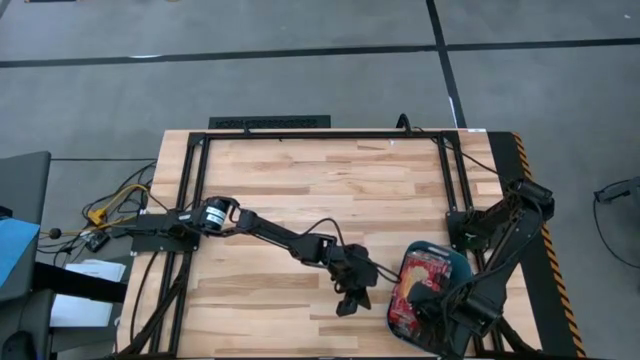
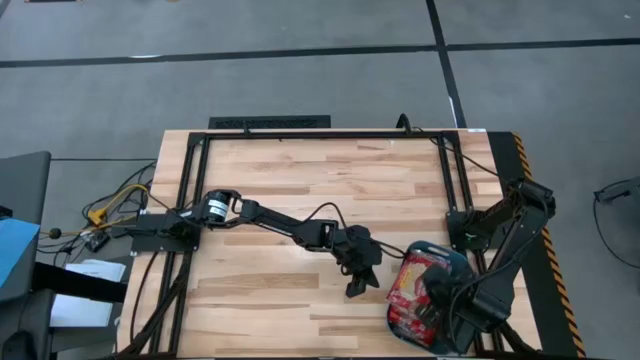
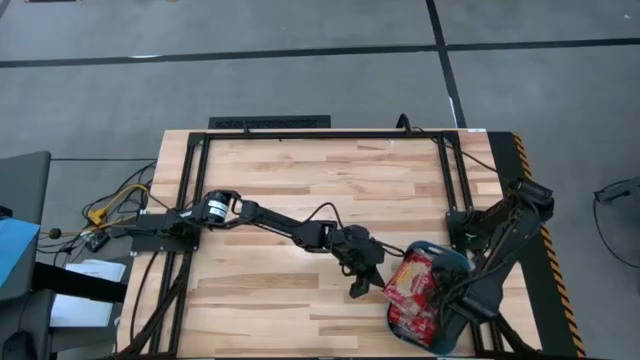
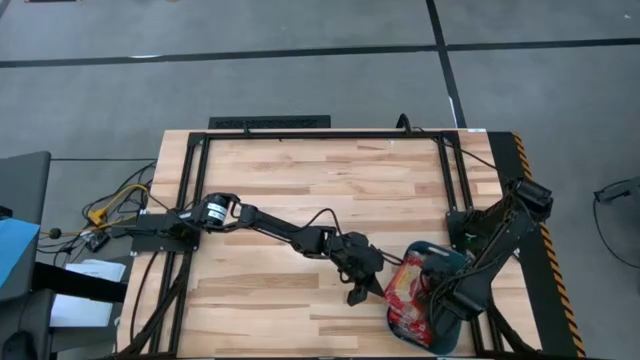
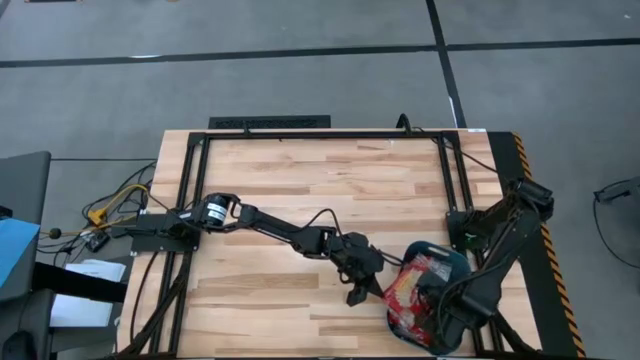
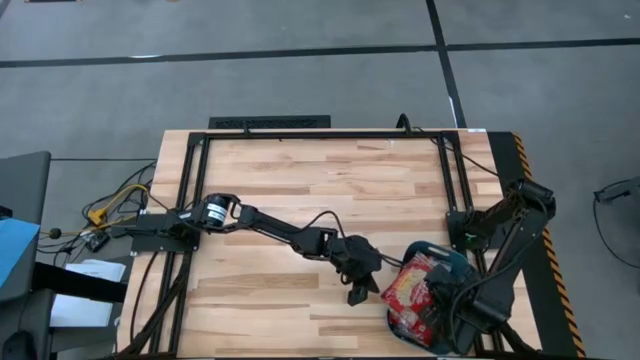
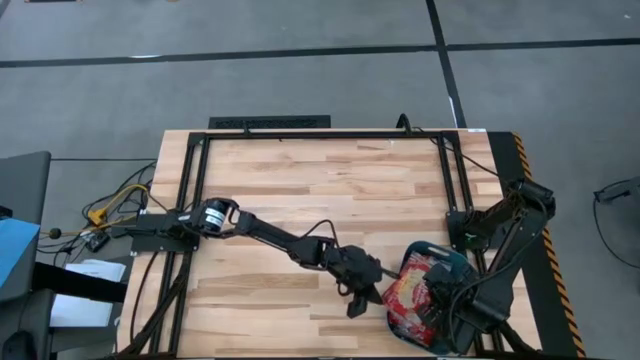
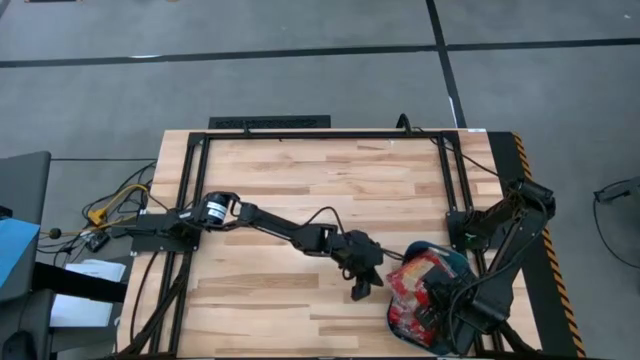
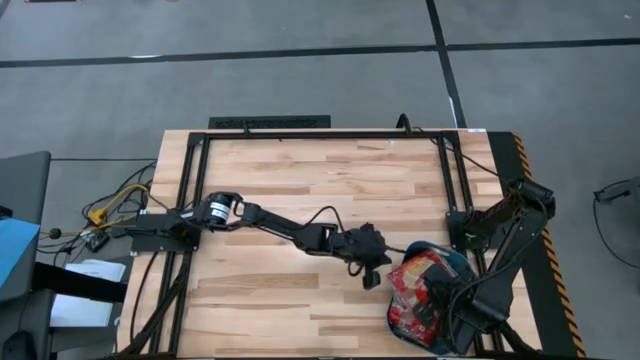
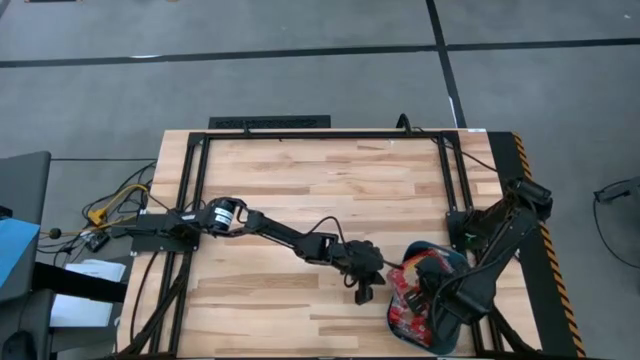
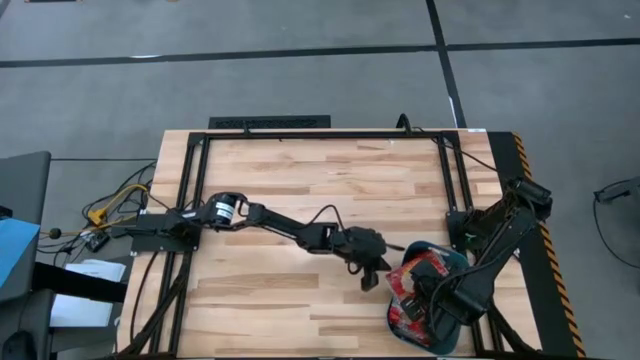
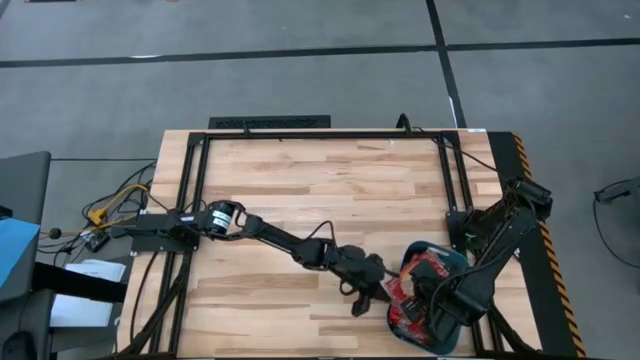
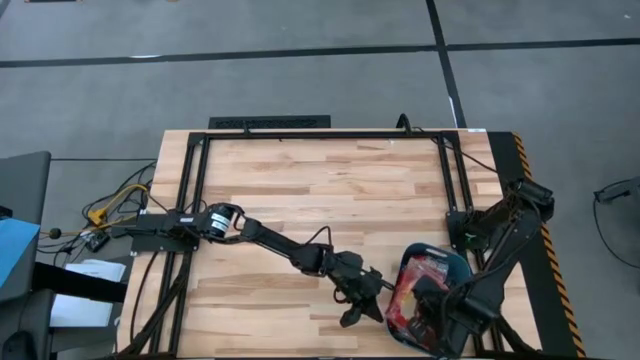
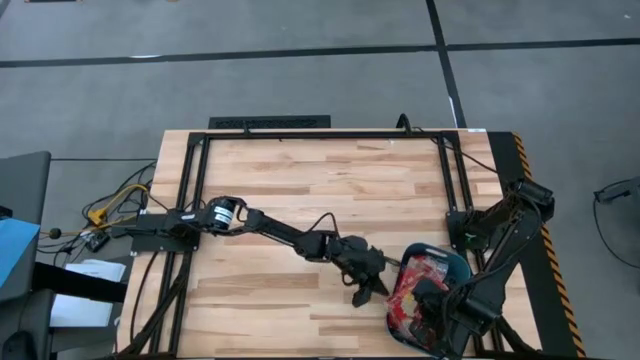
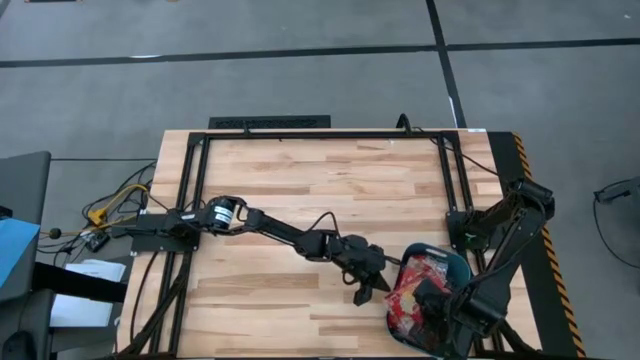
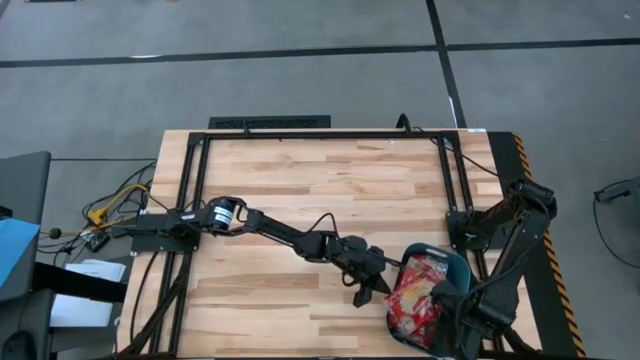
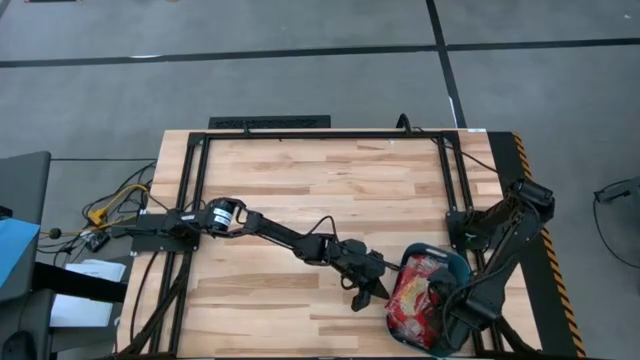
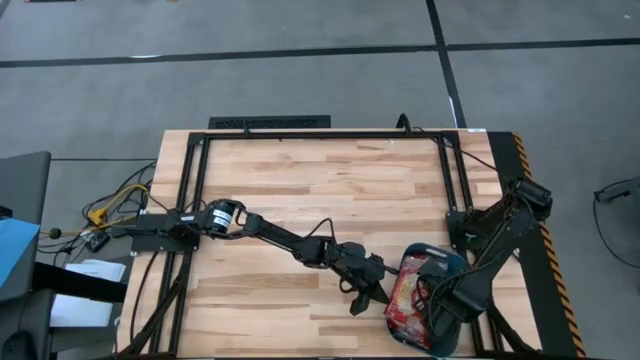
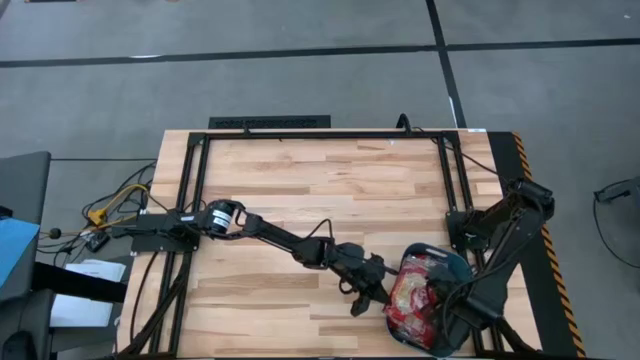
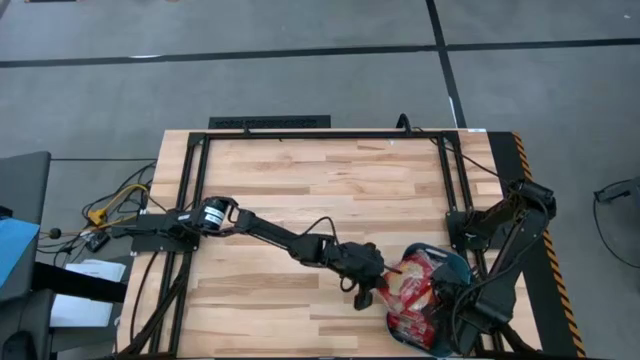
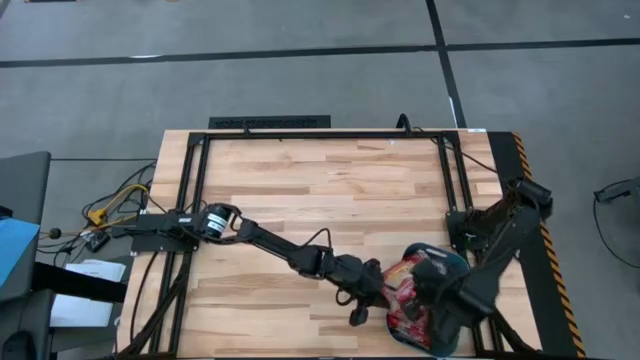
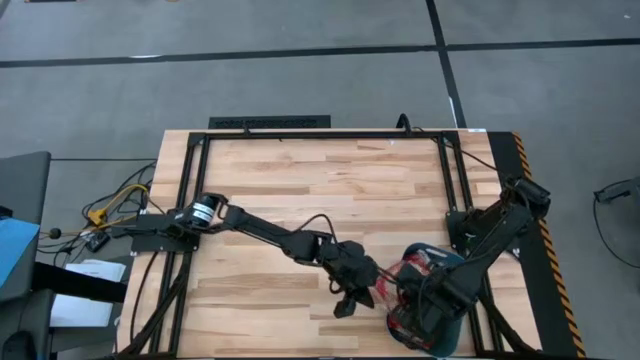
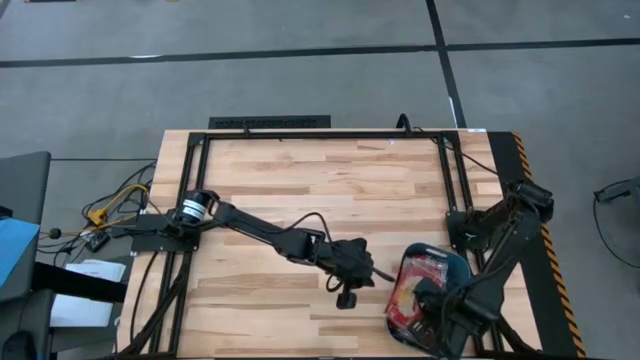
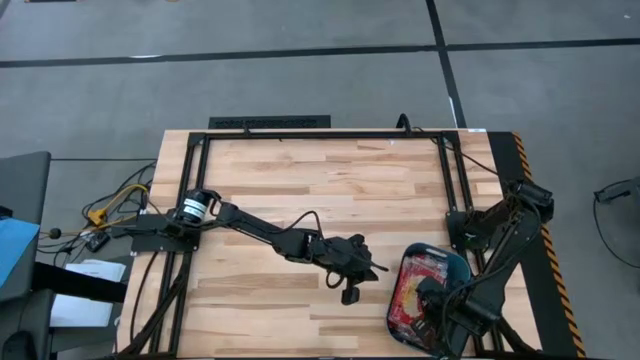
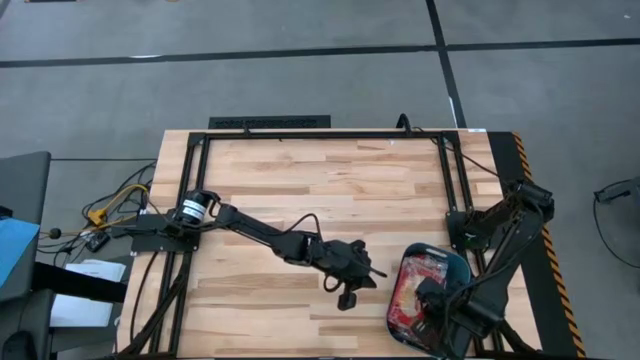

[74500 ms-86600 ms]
Task: Sort popcorn bags into baskets
Put the popcorn bag into the blue bin

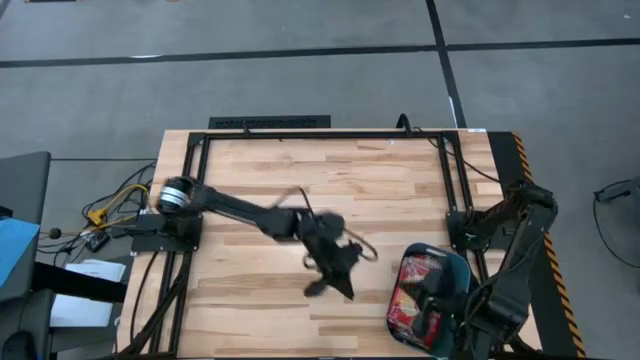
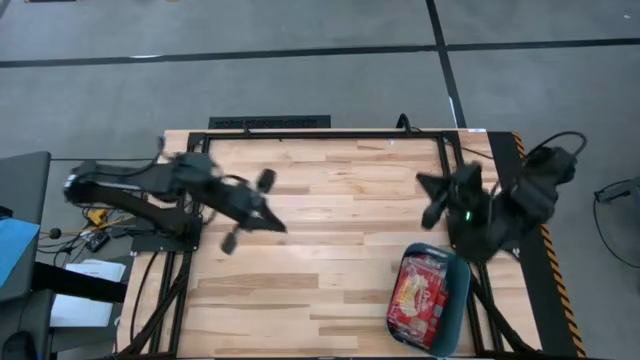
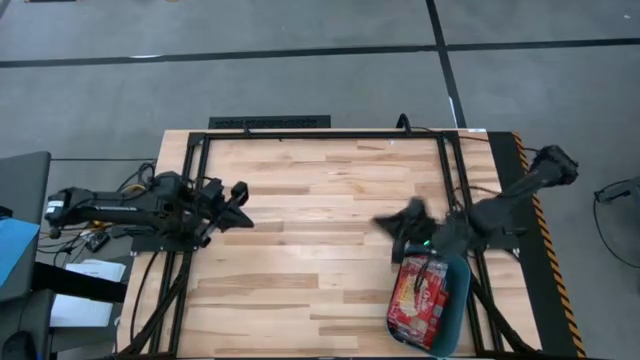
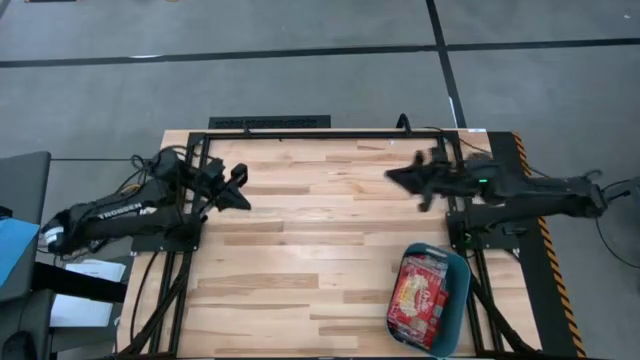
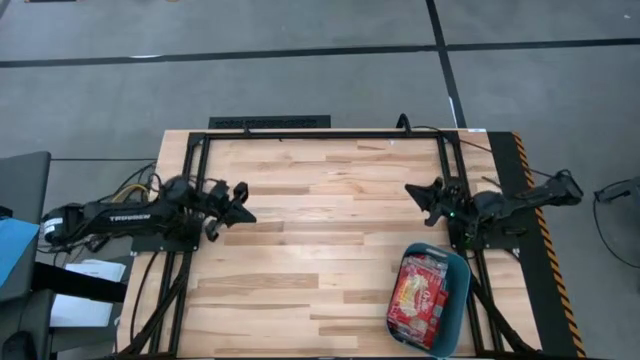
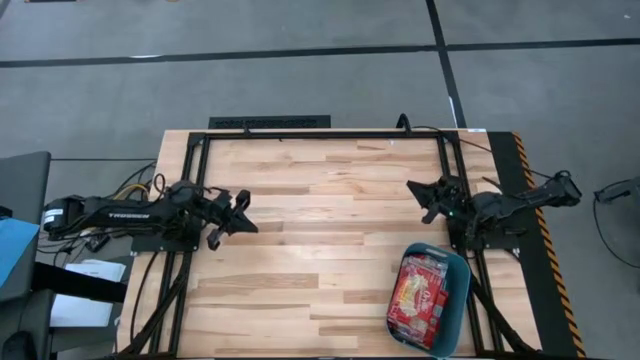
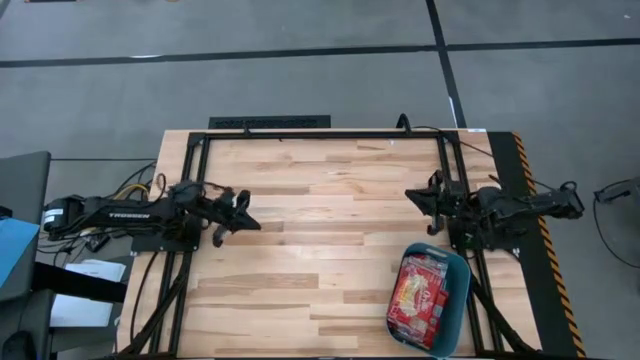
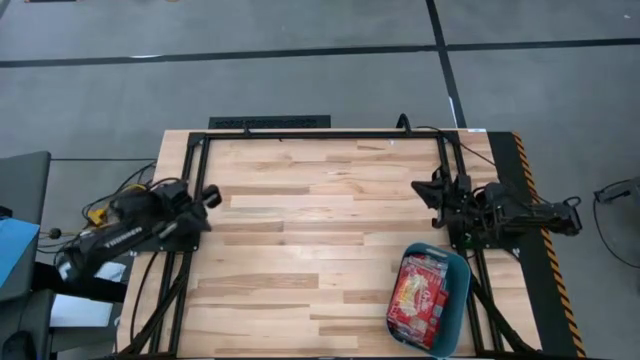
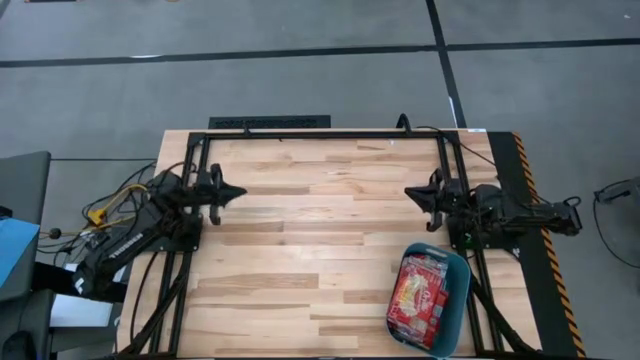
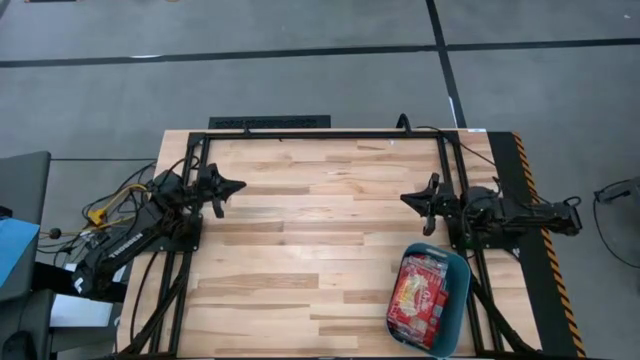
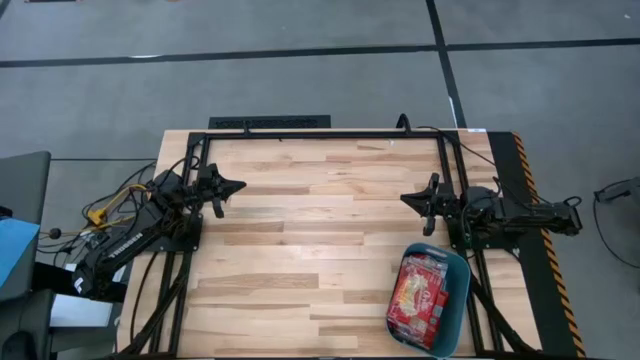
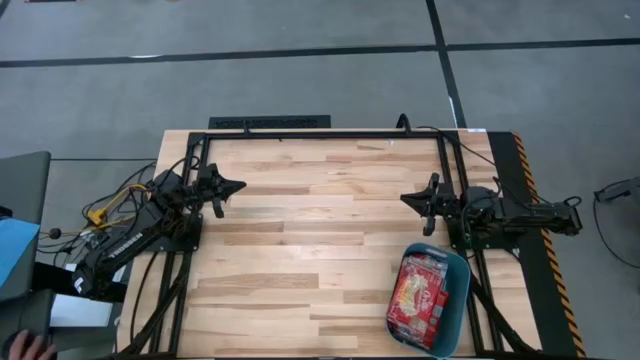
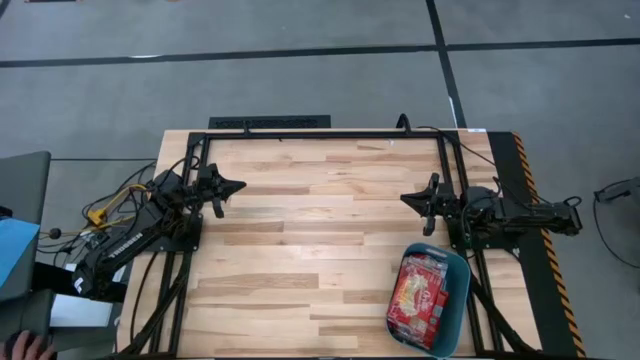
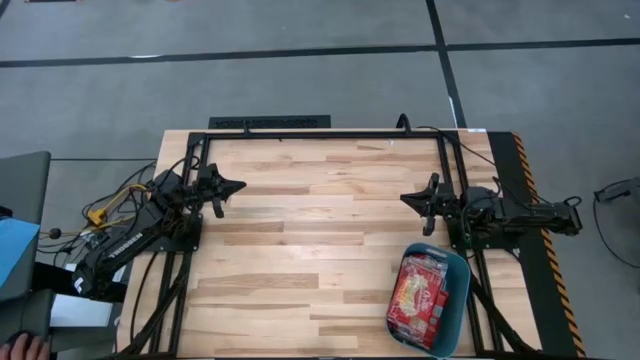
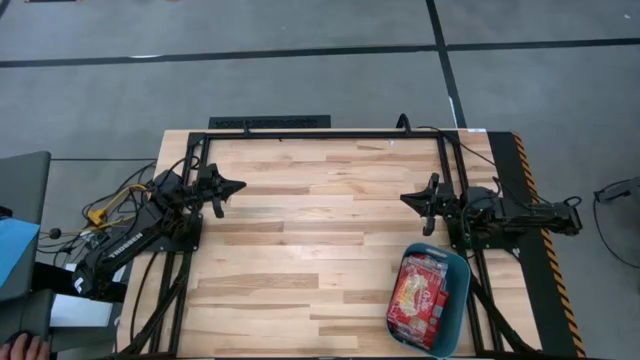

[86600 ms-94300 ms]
Return to Home Position

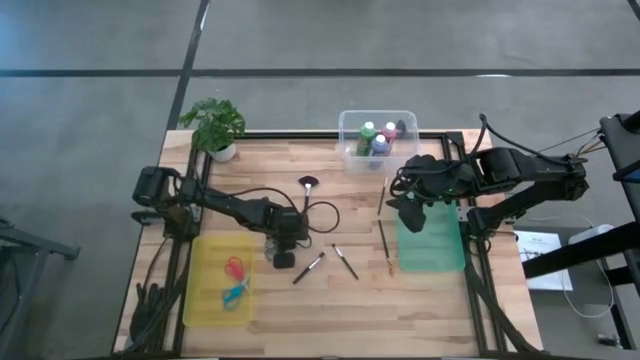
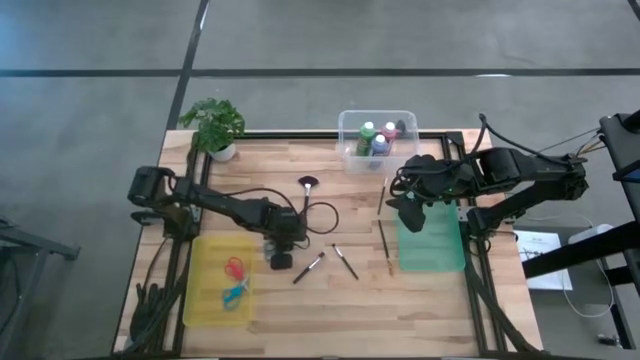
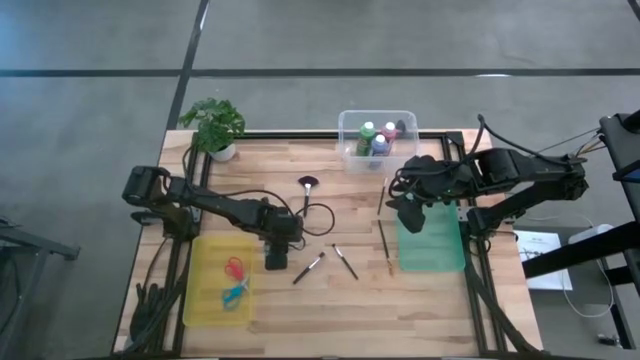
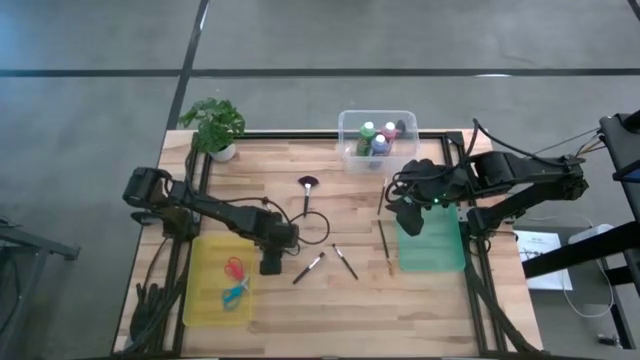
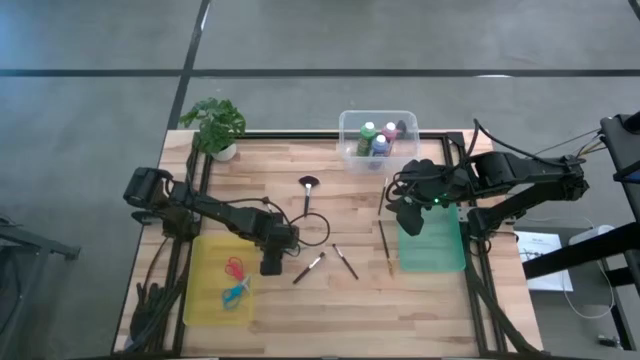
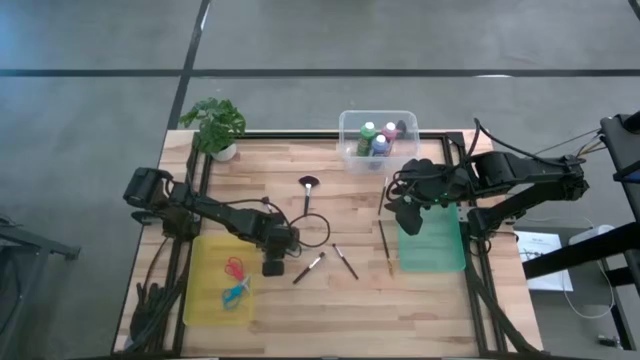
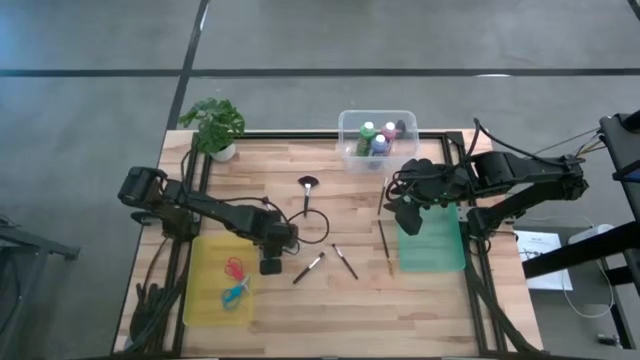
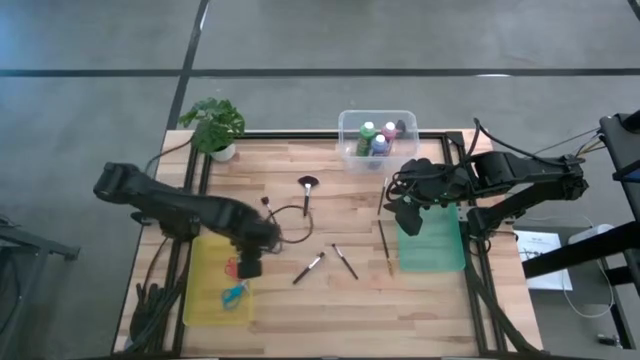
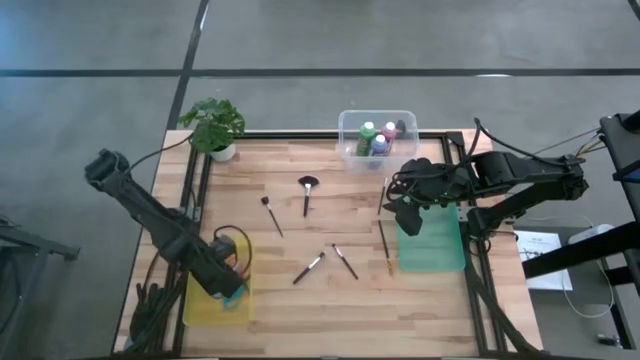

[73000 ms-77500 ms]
Task: Pick & Place Paint Supplies
Put the gray and blue scissors into the yellow bin
